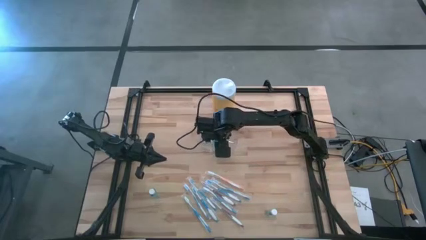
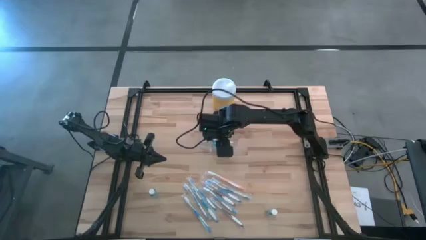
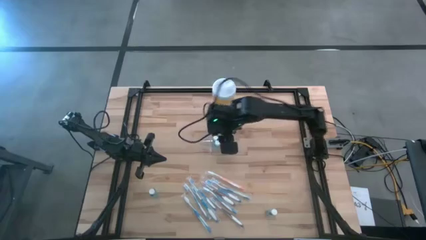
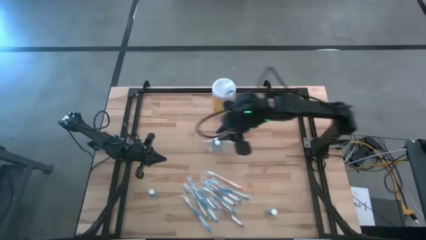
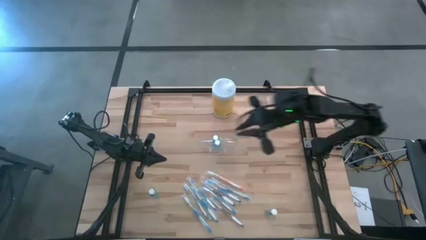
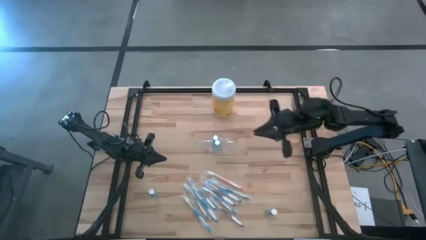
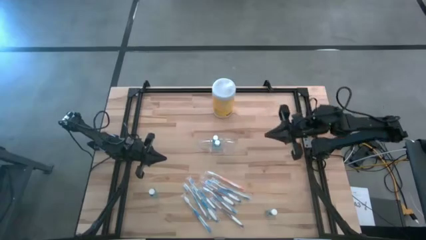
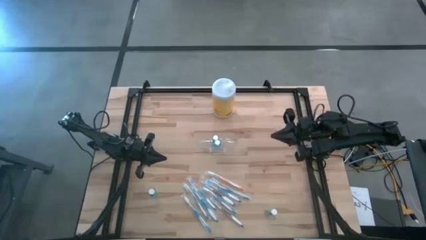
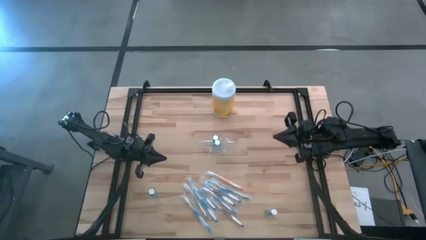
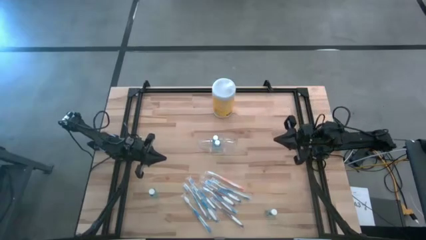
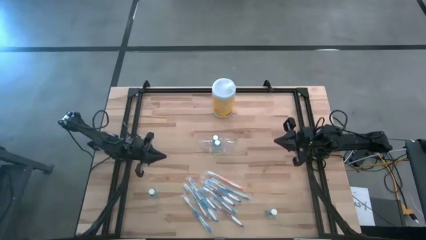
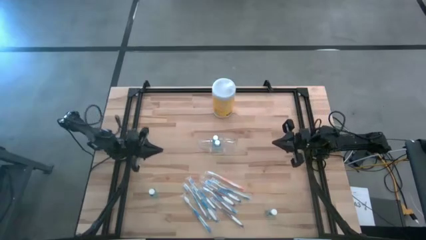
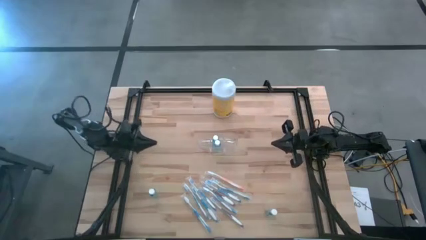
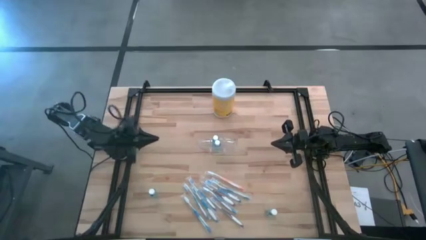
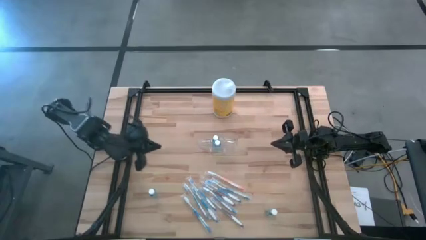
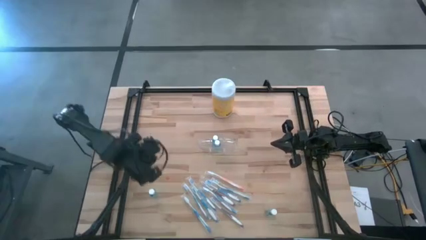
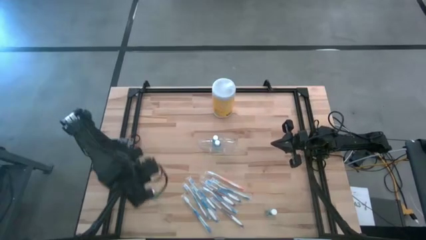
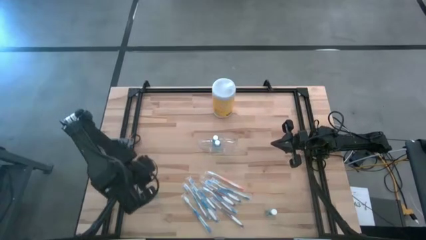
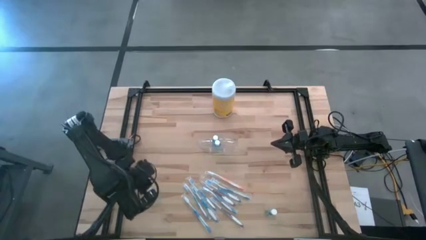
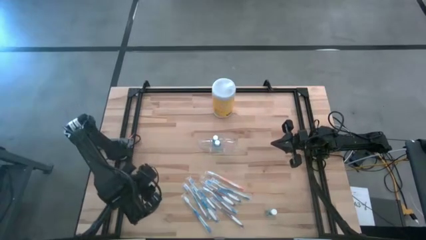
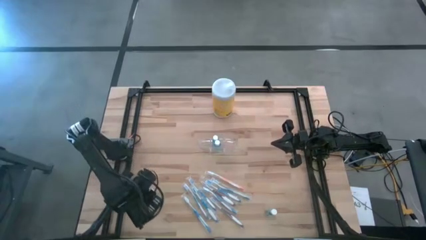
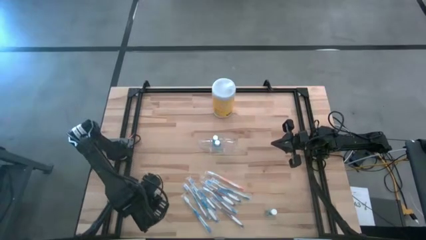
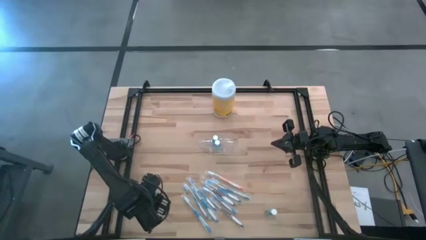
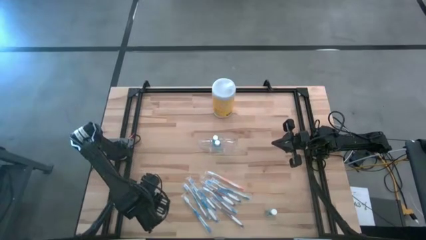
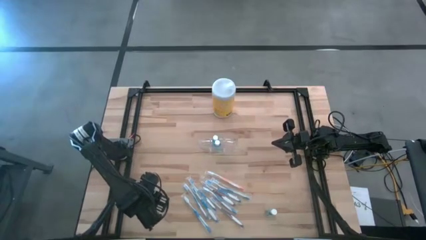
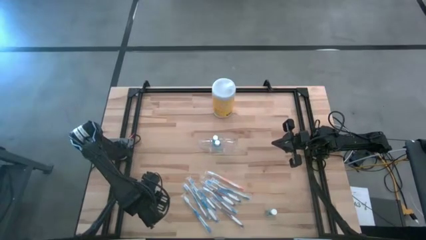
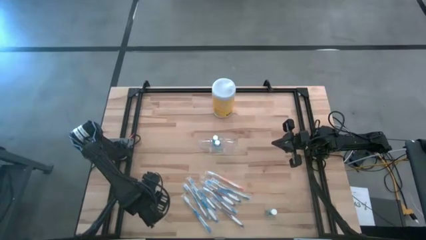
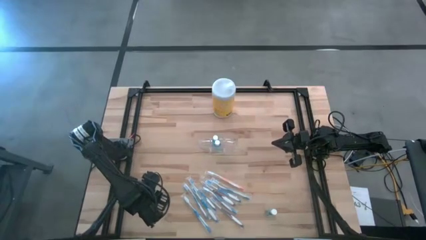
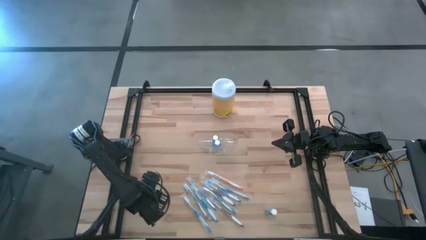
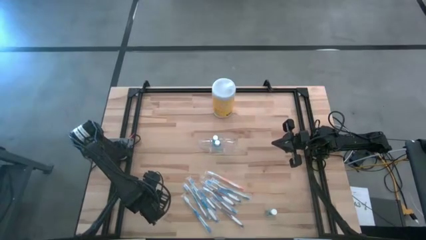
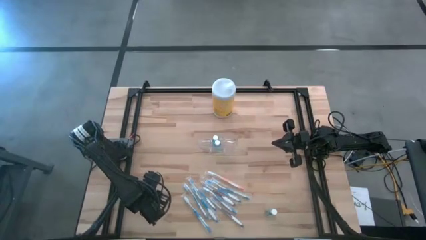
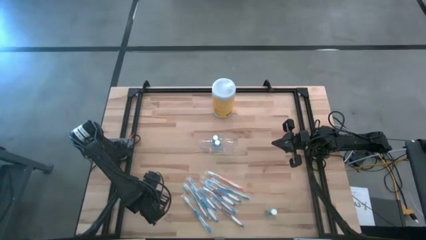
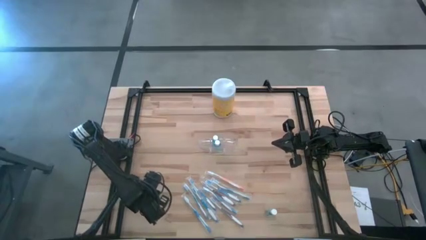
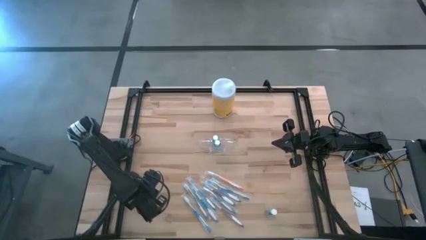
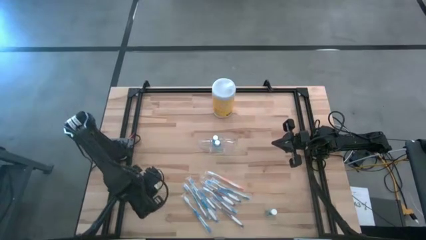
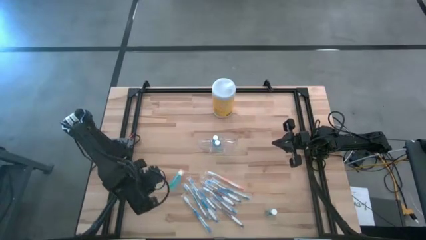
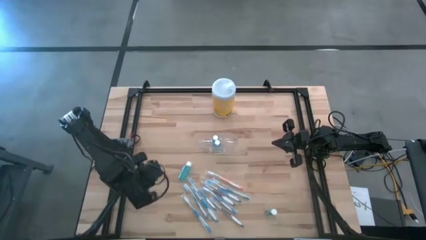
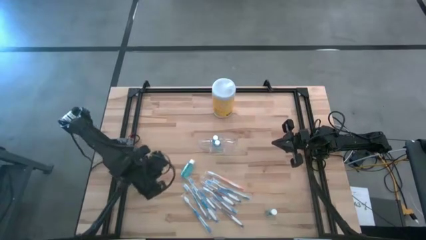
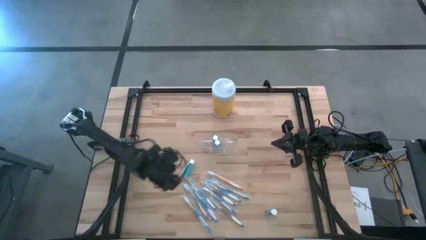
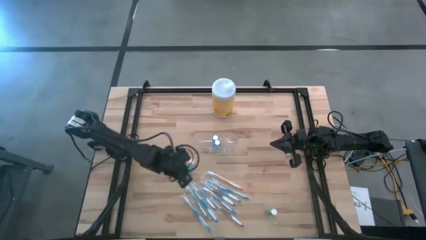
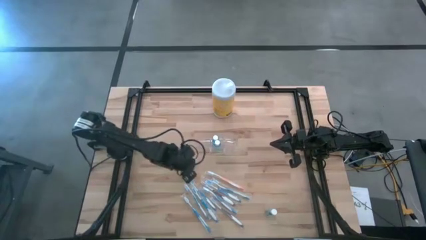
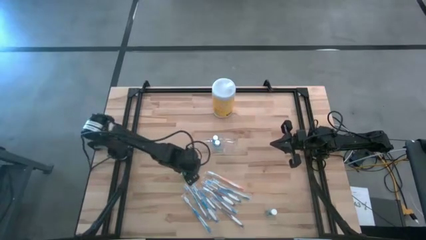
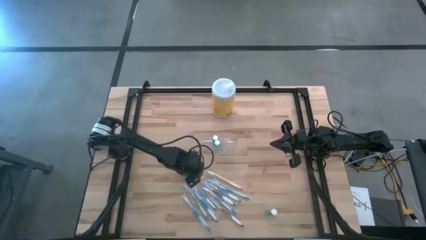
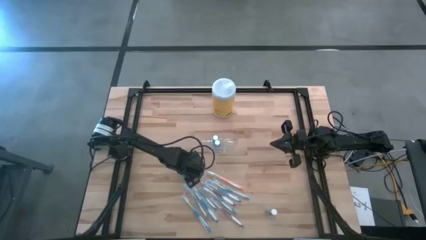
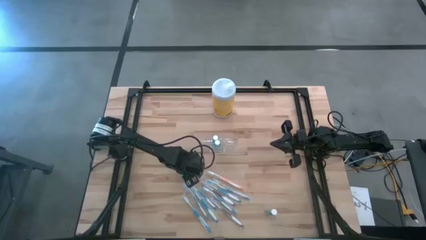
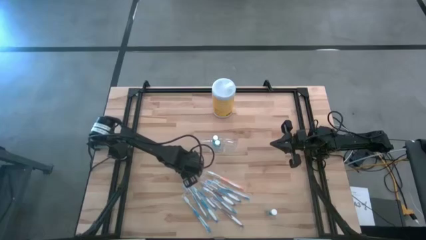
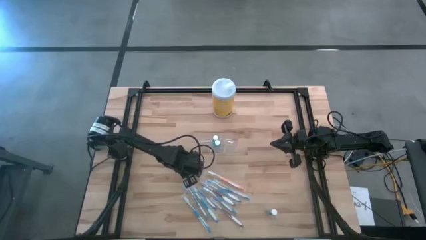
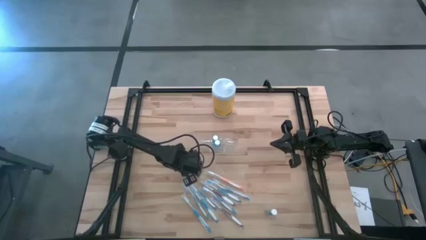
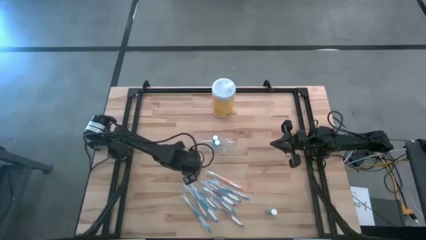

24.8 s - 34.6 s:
Task: Pick & Place toothbrushing station
Put the mouthwash into the transparent organizer
